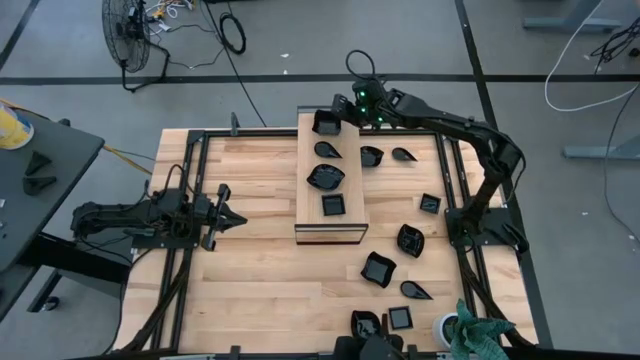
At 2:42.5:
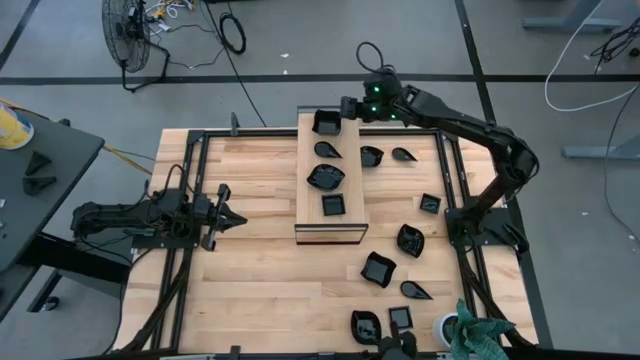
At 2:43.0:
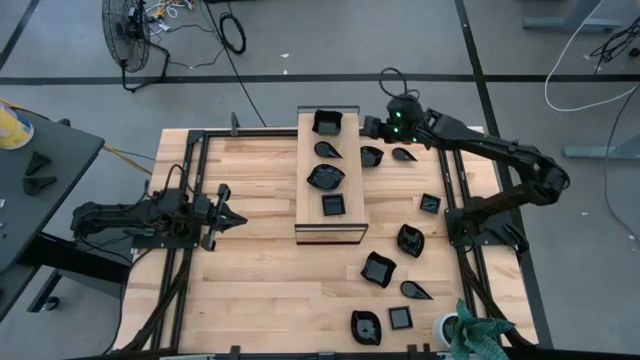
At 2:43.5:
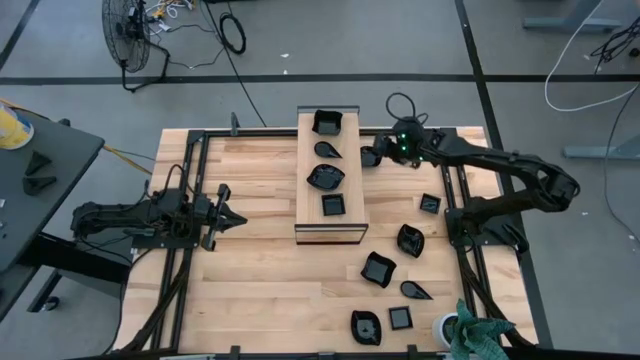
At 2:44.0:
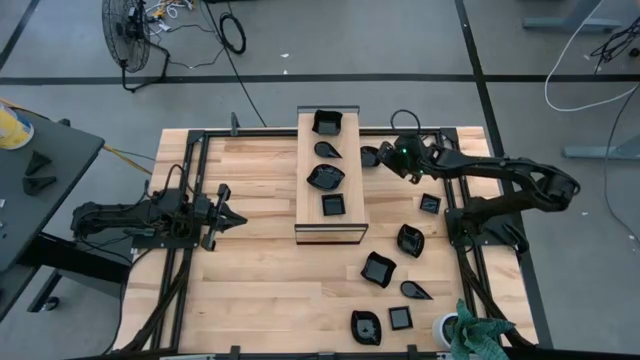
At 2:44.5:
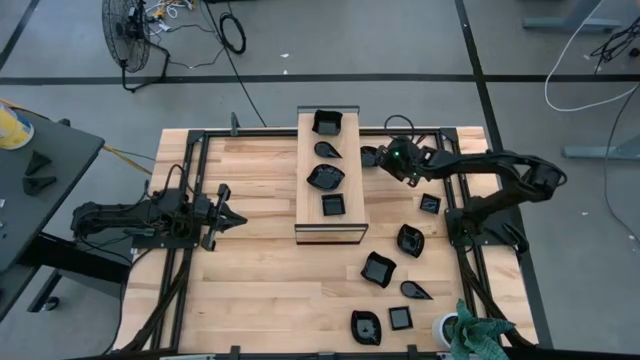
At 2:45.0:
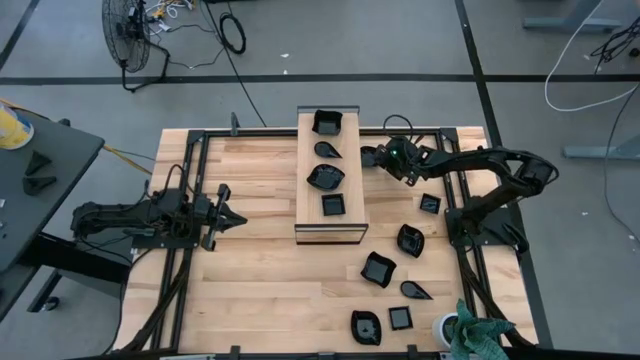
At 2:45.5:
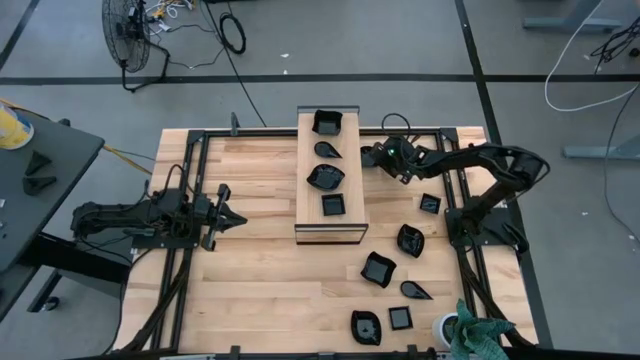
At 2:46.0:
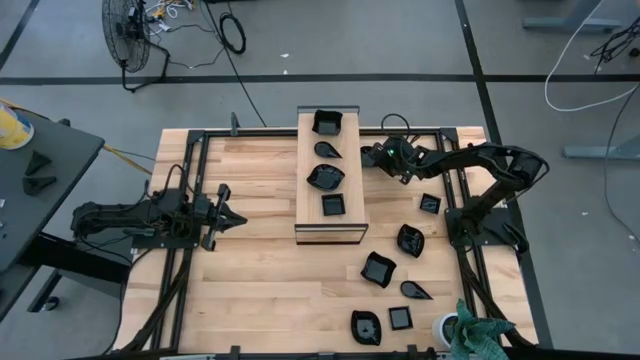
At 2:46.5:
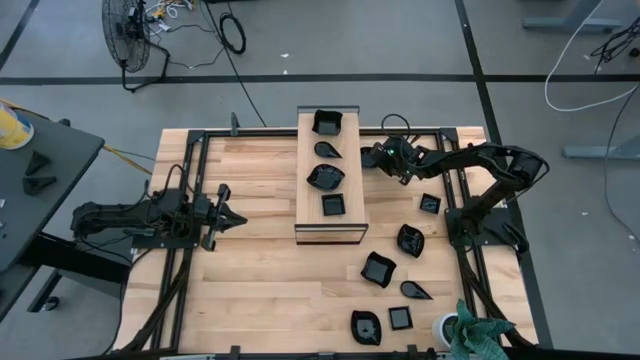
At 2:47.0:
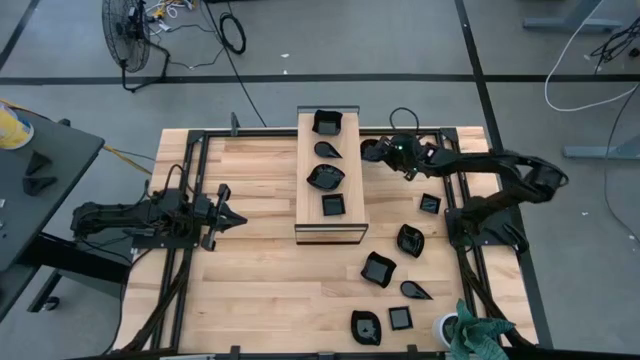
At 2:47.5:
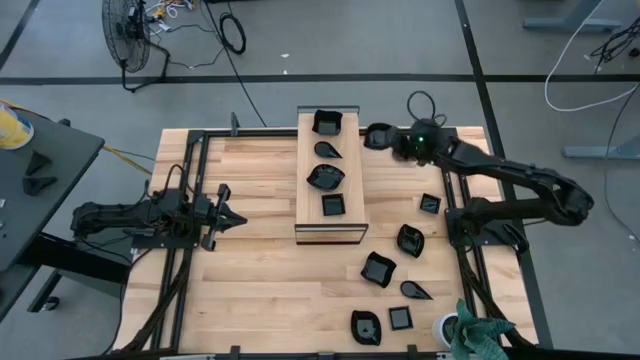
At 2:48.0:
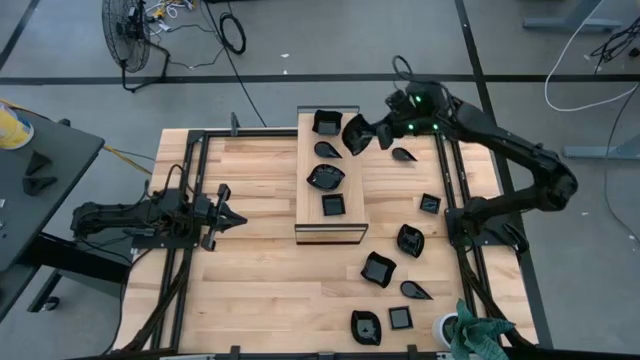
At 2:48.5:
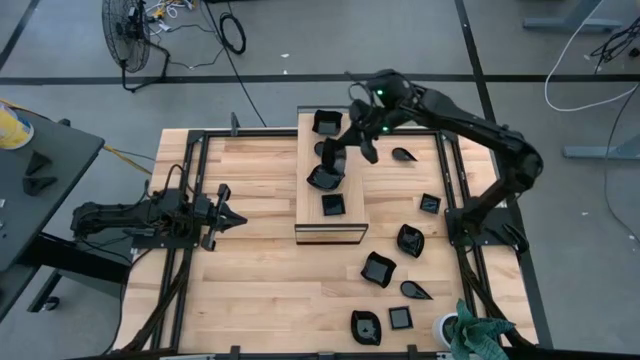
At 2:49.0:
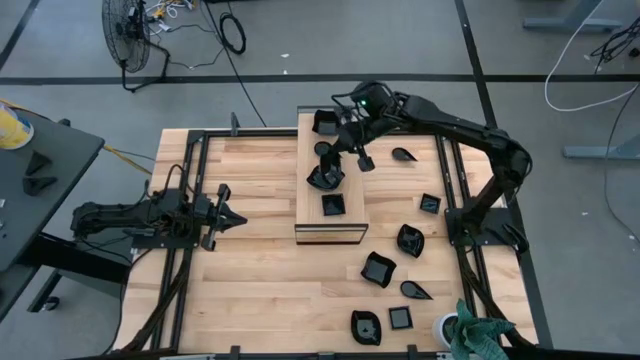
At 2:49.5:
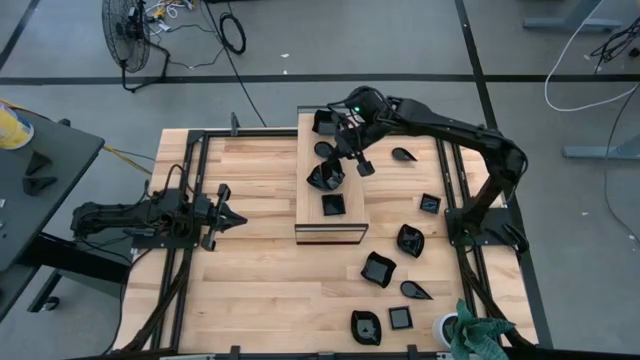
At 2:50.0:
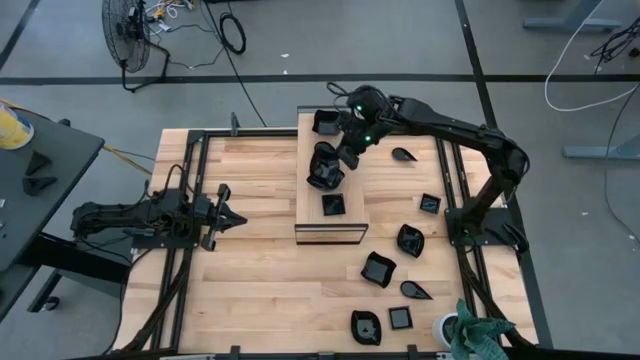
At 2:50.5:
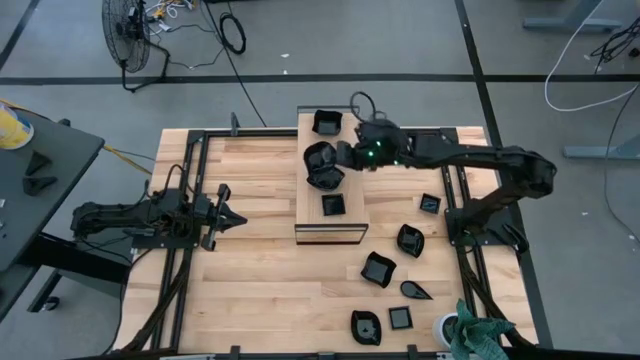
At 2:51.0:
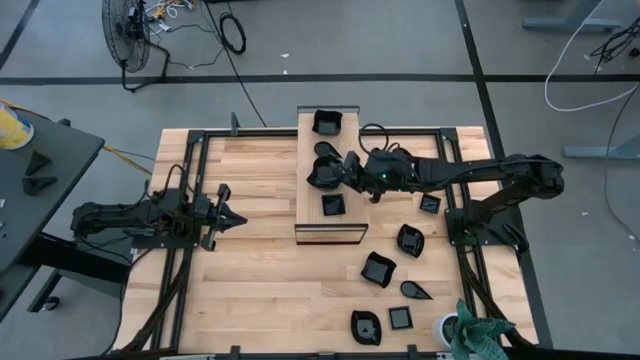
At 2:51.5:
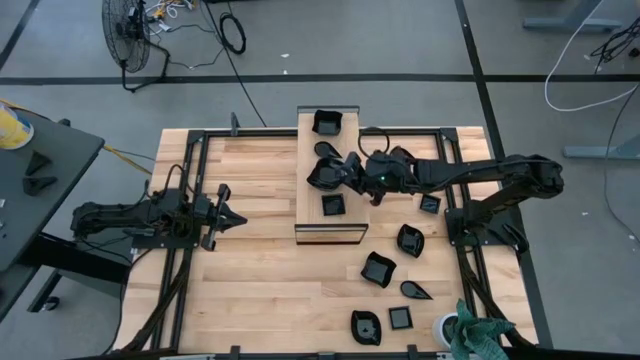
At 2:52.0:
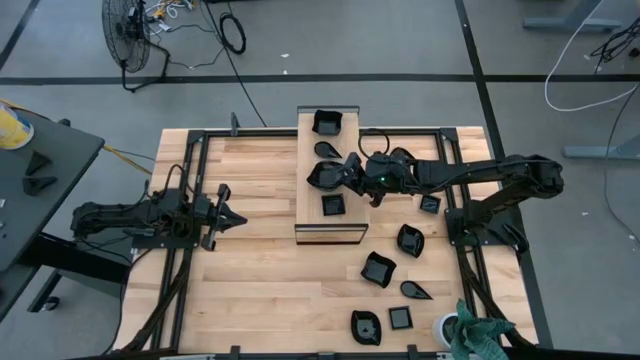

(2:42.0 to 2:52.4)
Task: Pick & Place Mini shaped plates
Stack the leaf-shaped plate on top of the leaf-shaped plate on the shelf

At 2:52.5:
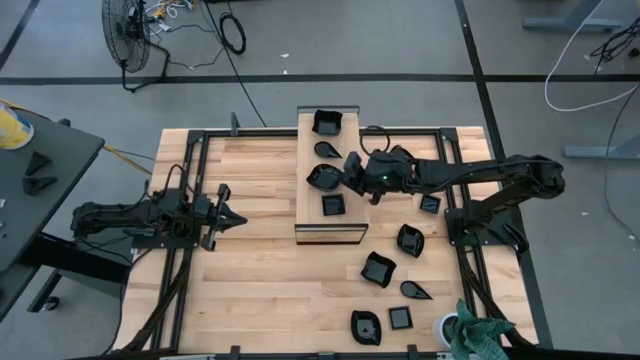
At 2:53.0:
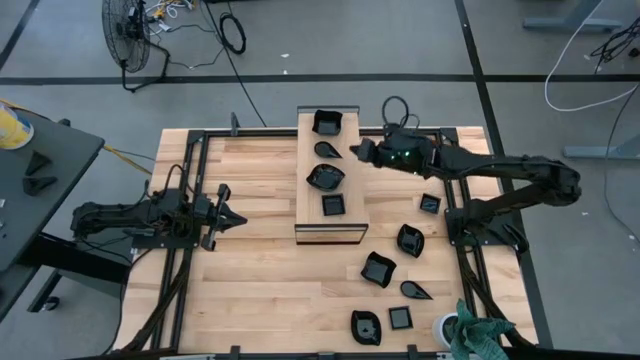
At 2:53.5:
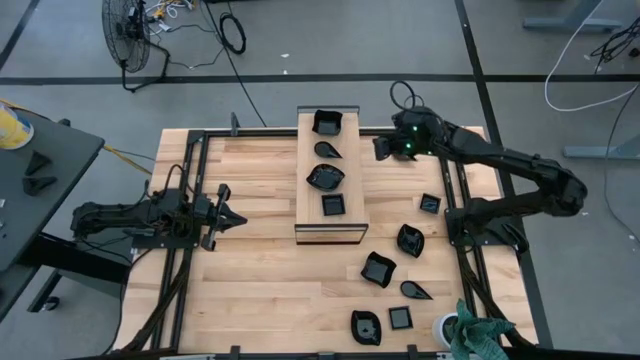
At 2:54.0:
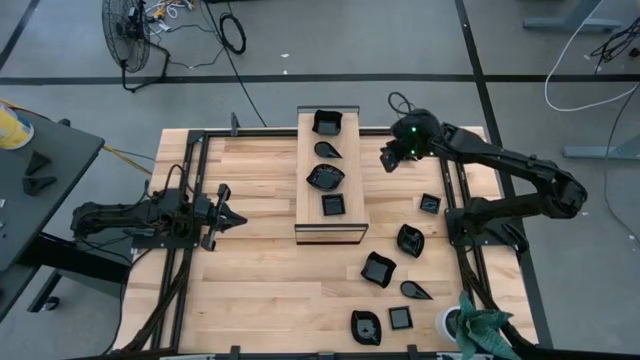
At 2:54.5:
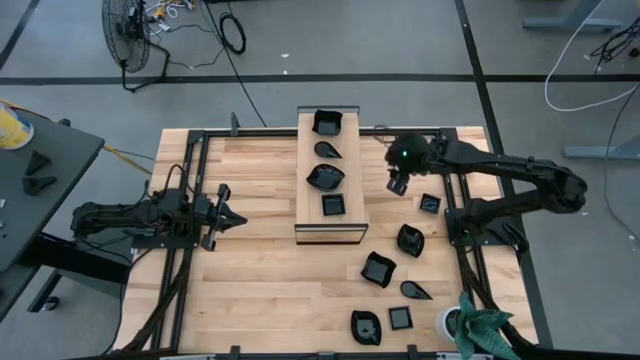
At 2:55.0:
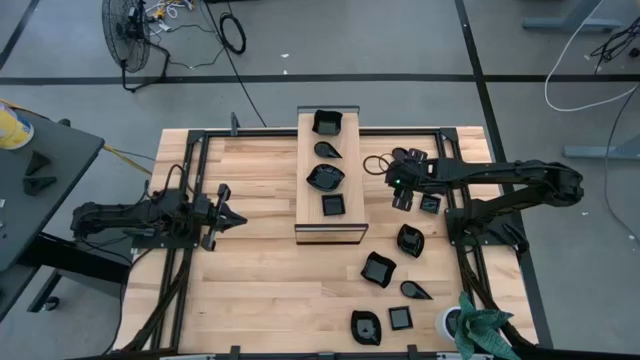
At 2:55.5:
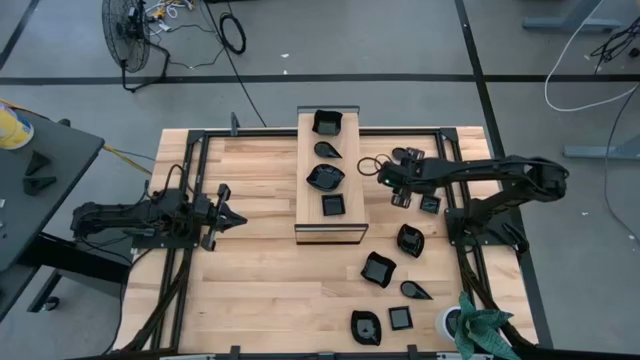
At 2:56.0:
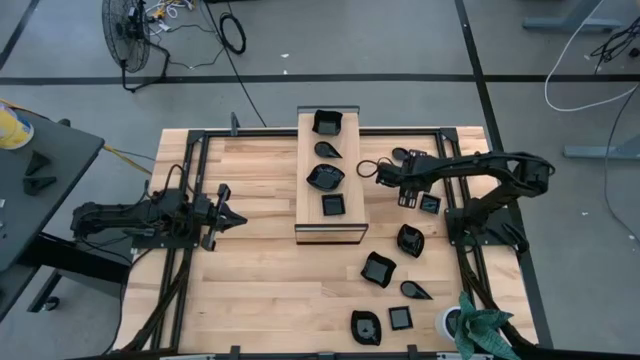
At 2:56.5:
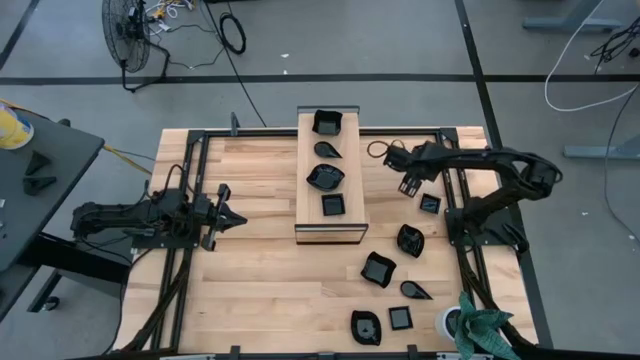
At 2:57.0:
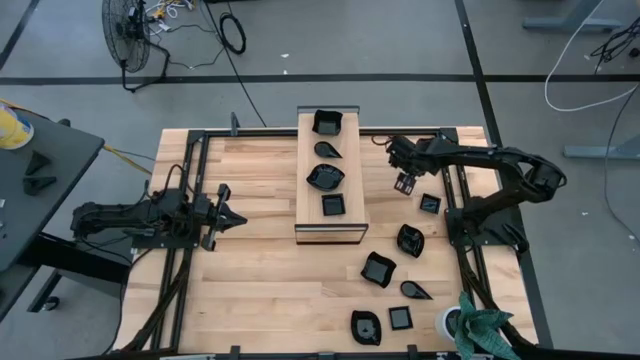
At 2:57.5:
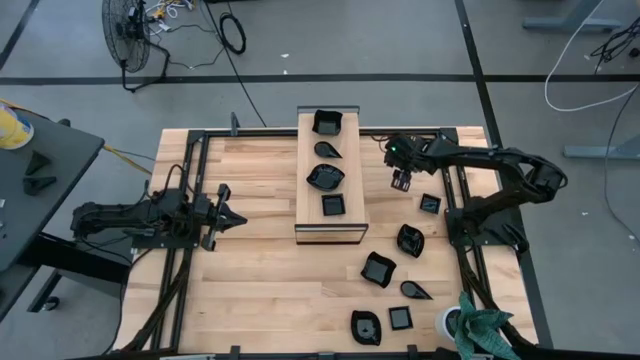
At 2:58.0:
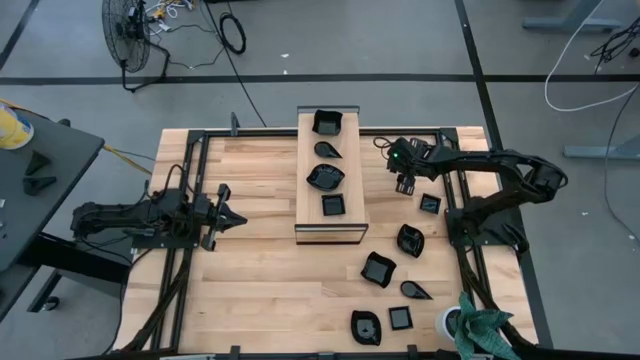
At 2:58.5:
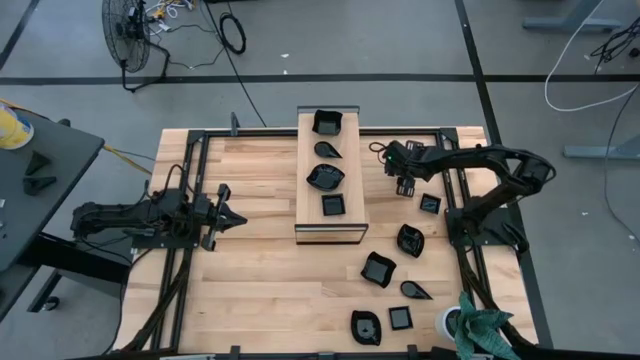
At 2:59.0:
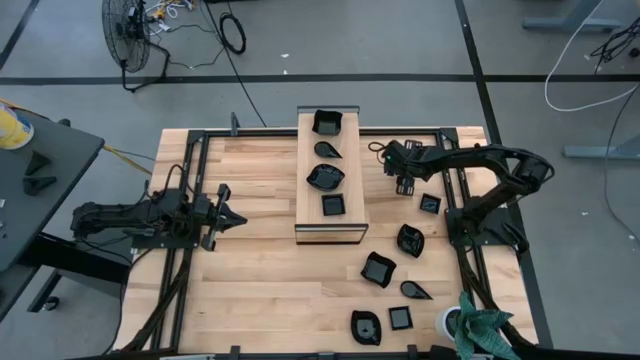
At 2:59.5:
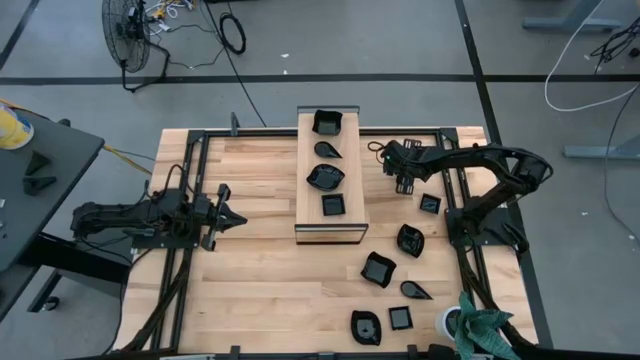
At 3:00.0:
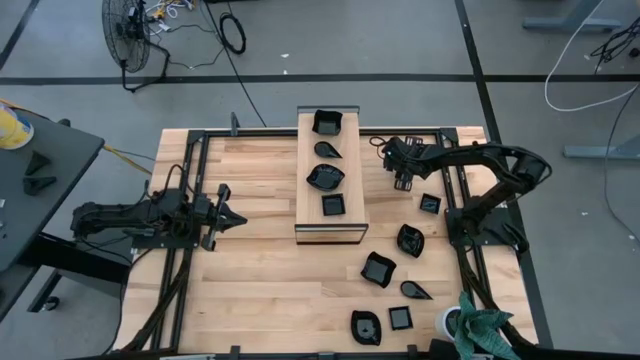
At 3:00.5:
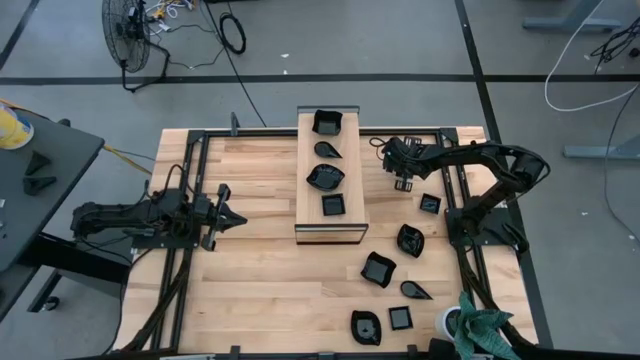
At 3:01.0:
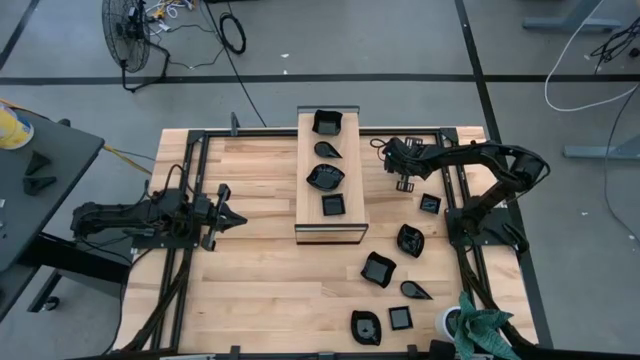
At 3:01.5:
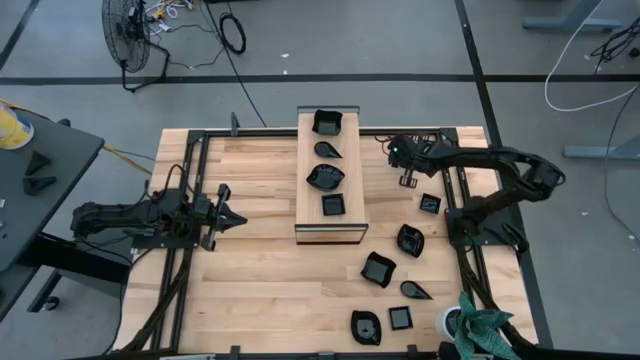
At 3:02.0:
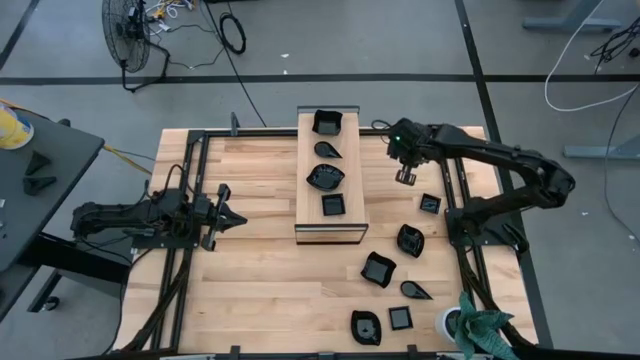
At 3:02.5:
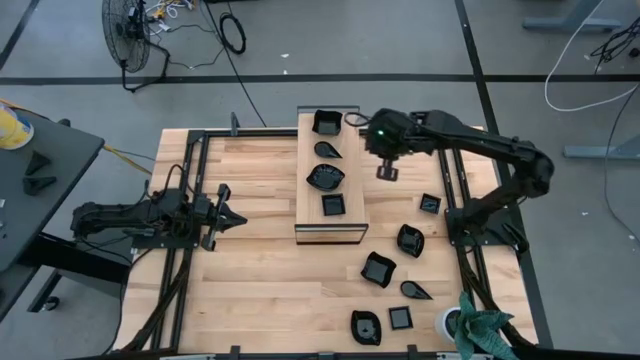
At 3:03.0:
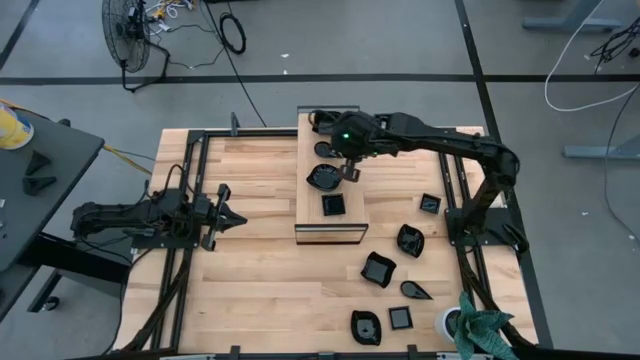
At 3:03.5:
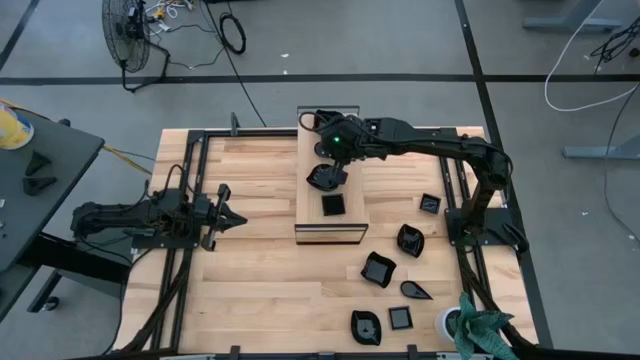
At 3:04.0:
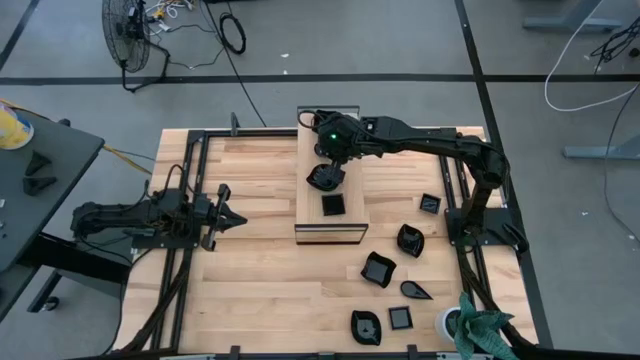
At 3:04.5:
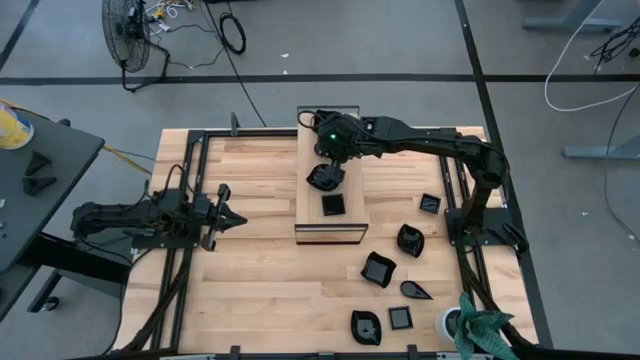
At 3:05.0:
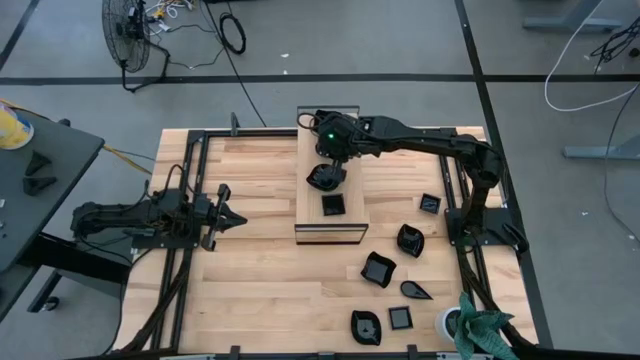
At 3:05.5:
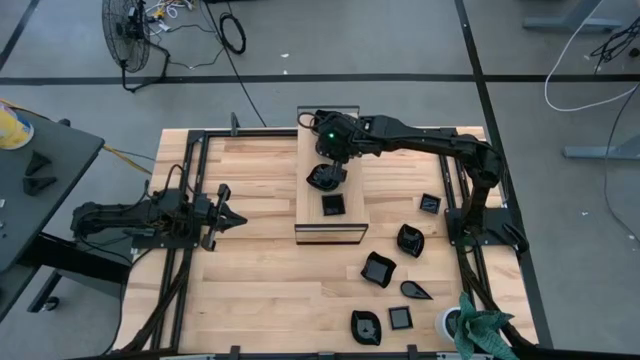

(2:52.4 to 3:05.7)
Stack the drop-shaped plate on top of the drop-shaped plate on the shelf
